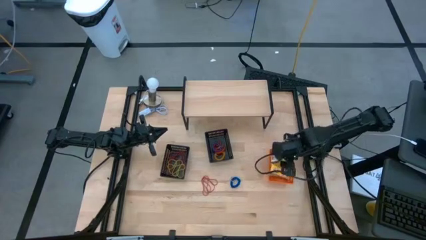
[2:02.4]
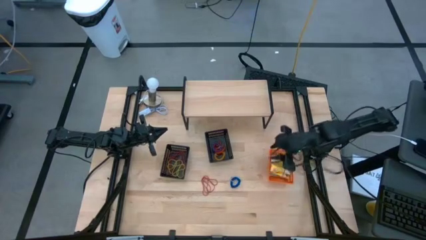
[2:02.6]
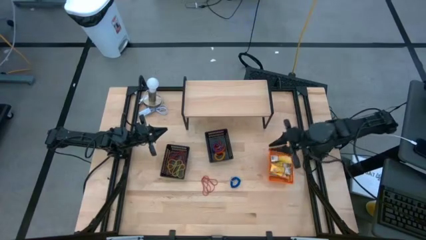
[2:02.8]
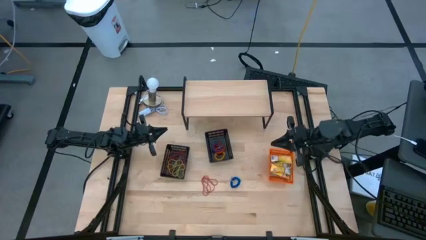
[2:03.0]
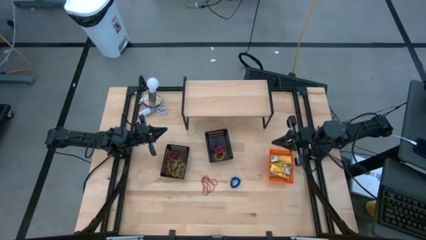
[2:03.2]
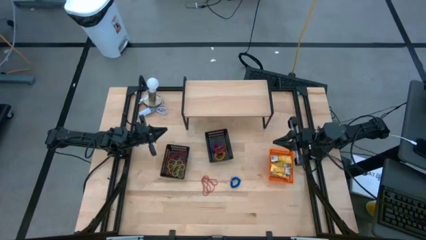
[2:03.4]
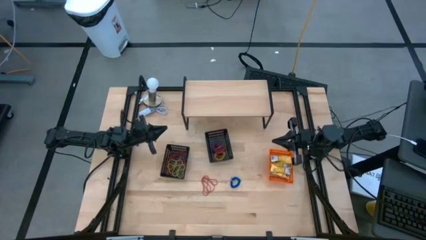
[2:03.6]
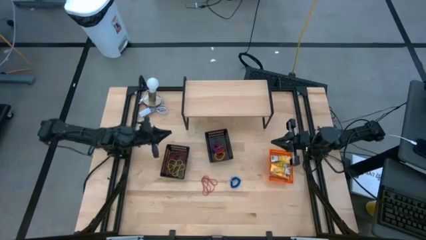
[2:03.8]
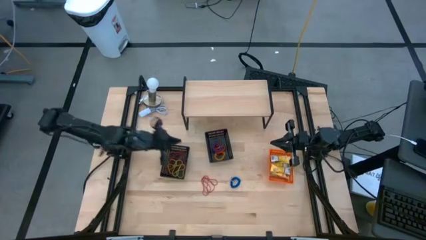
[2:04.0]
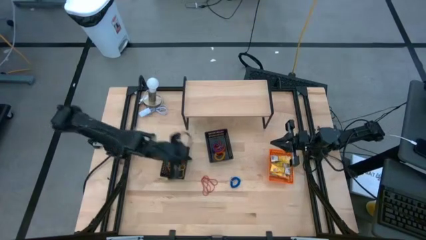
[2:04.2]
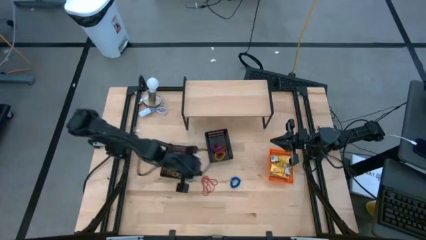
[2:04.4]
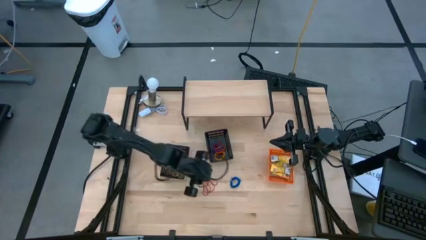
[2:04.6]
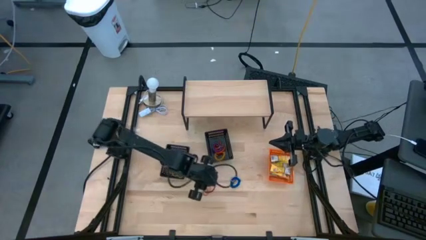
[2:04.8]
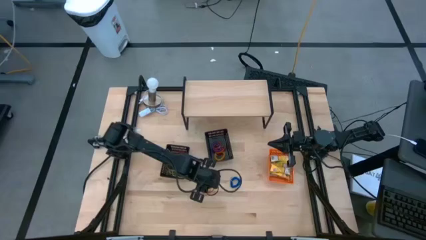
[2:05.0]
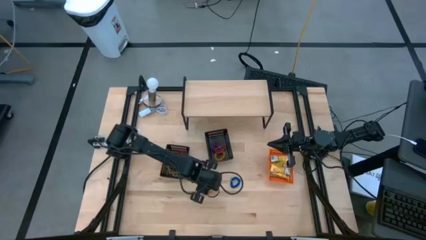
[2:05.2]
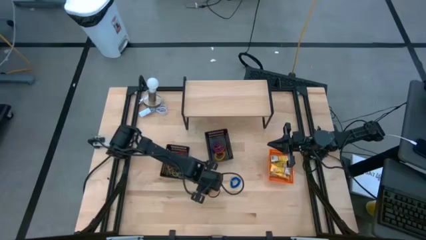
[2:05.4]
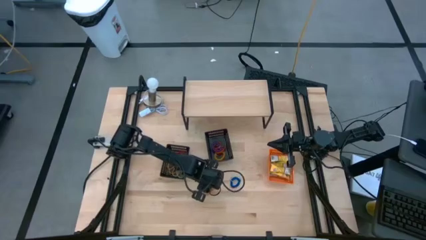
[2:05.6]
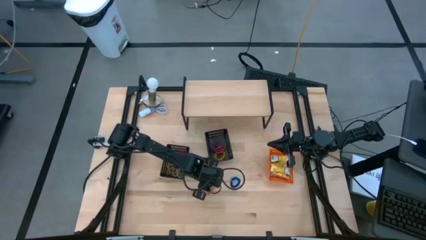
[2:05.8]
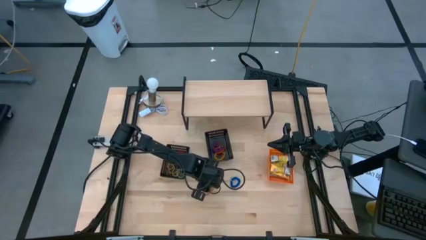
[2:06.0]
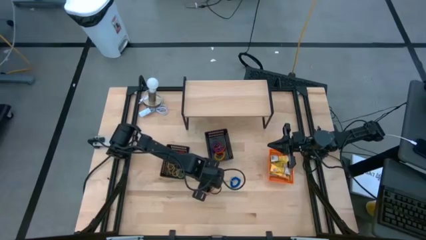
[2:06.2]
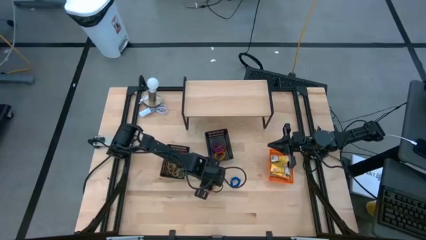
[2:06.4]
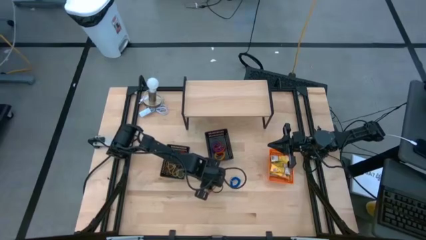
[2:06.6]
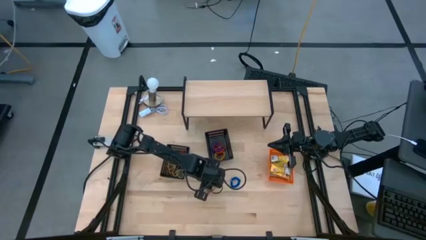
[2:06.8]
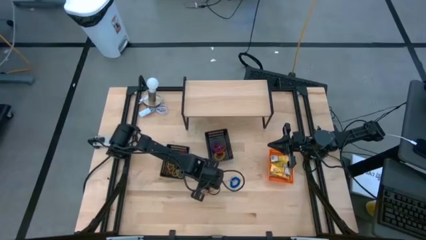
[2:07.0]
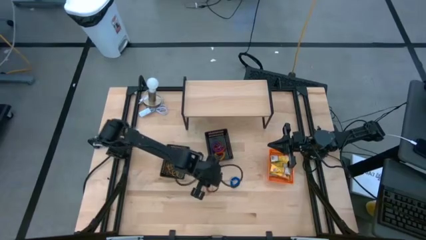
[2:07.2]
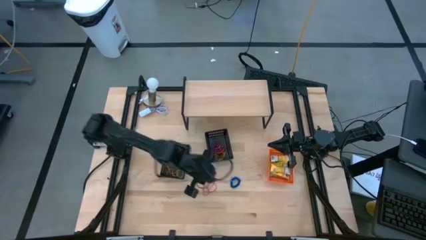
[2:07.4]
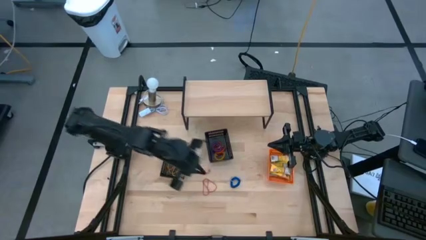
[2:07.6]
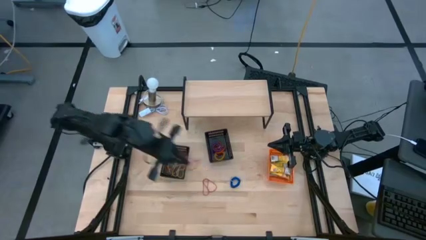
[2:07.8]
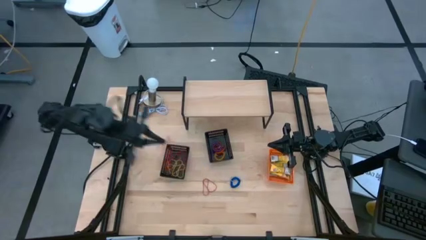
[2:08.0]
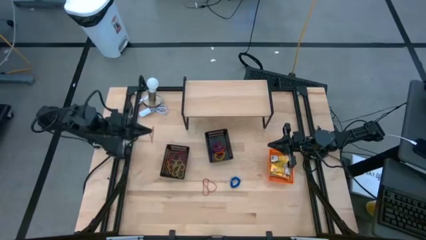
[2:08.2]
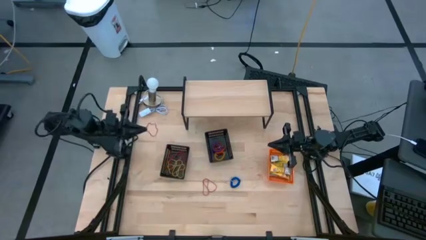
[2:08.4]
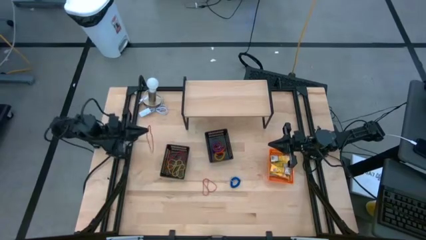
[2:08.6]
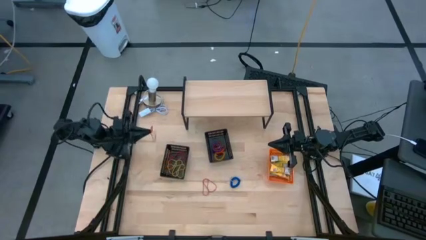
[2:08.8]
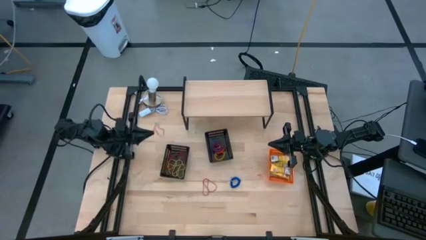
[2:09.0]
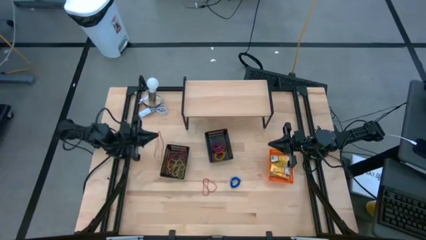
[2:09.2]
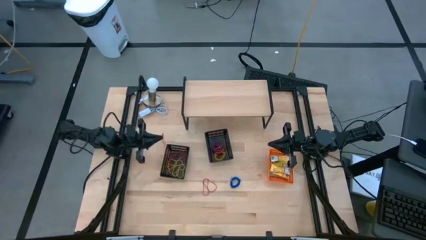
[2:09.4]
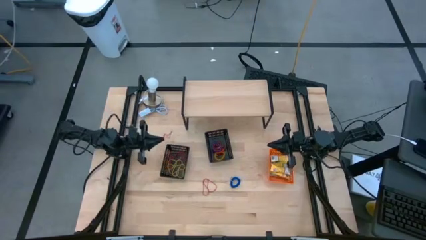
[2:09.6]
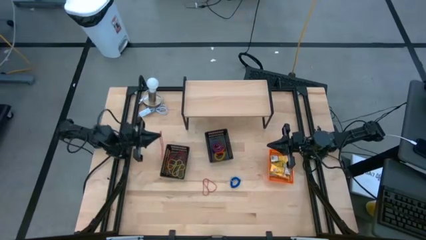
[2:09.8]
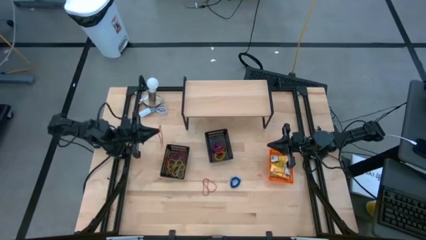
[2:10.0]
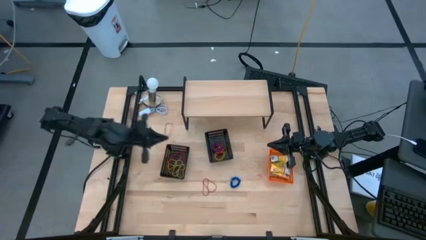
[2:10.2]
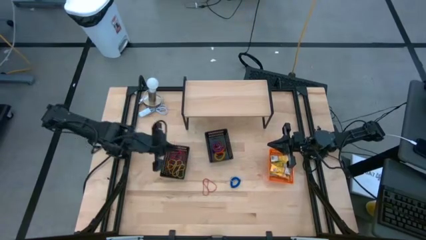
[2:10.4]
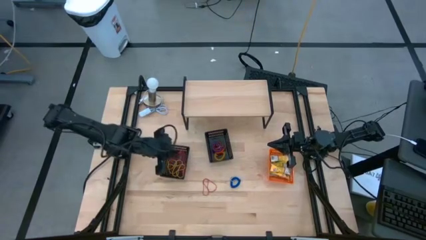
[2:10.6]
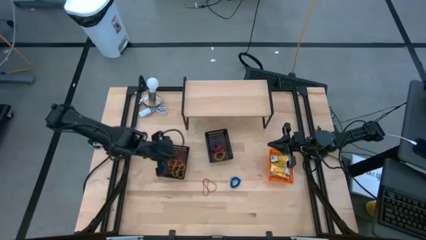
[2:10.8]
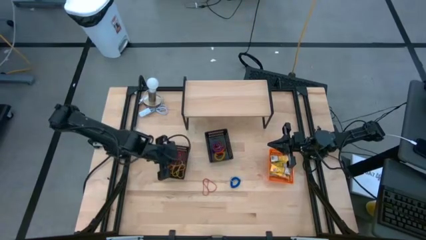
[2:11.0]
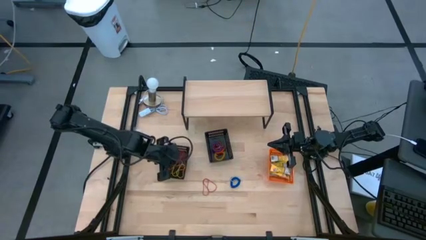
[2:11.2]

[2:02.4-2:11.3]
Task: Pick & Place Office Desk Supplies
Put the red rubber band into the left black bin

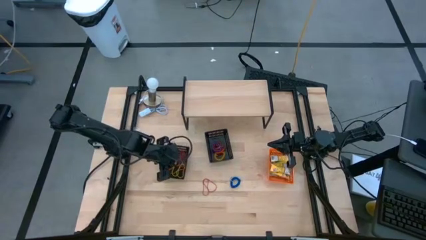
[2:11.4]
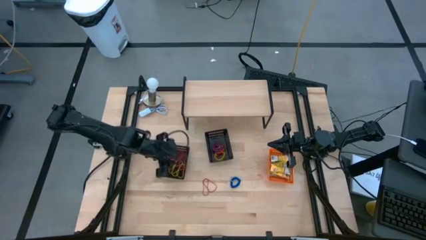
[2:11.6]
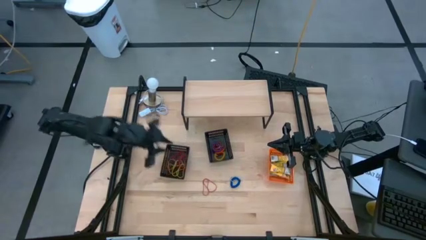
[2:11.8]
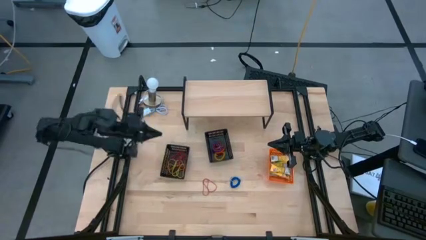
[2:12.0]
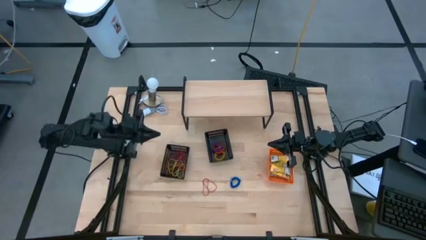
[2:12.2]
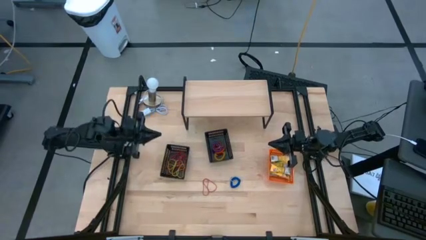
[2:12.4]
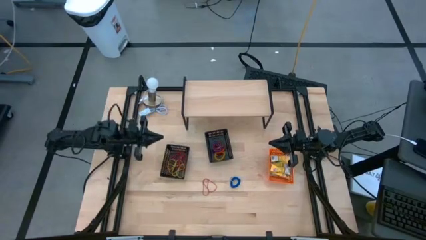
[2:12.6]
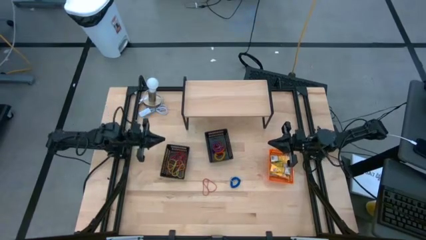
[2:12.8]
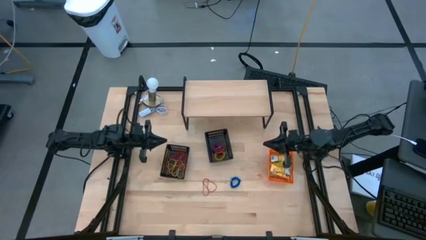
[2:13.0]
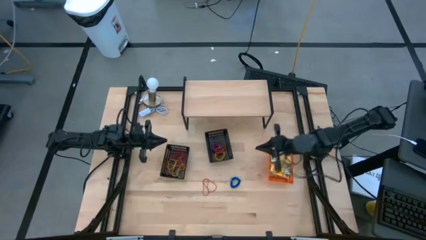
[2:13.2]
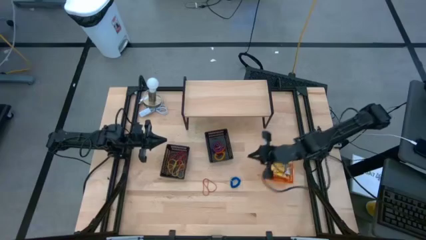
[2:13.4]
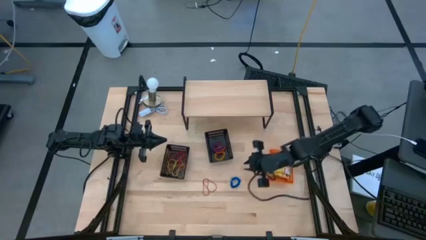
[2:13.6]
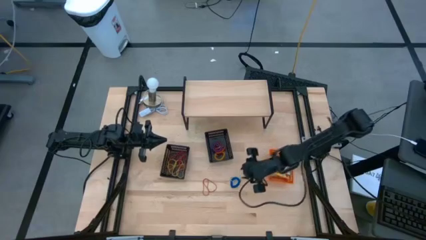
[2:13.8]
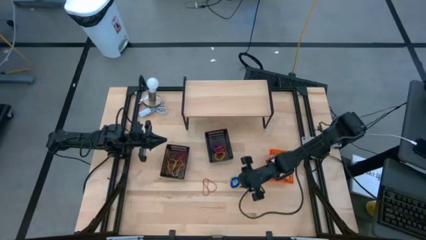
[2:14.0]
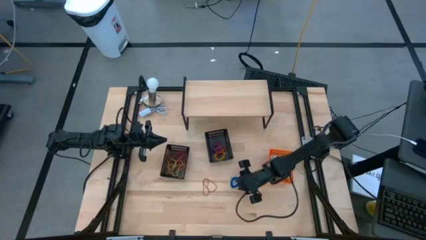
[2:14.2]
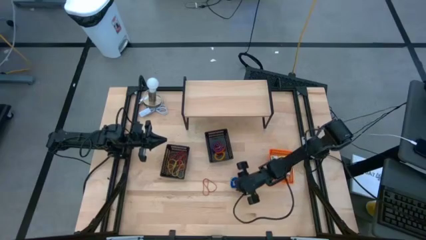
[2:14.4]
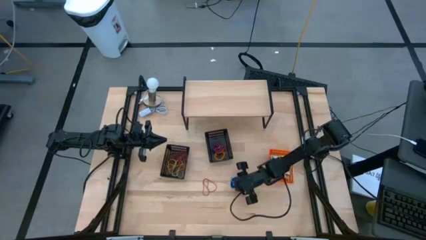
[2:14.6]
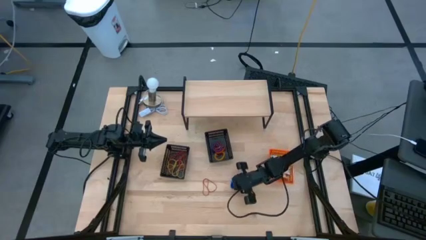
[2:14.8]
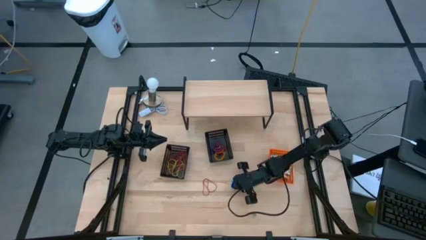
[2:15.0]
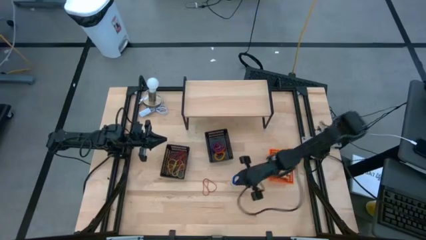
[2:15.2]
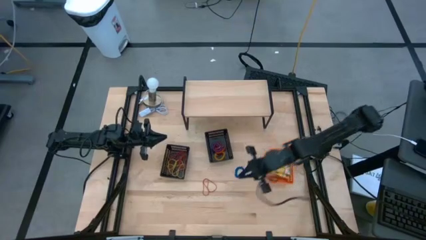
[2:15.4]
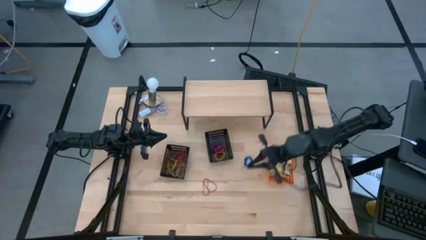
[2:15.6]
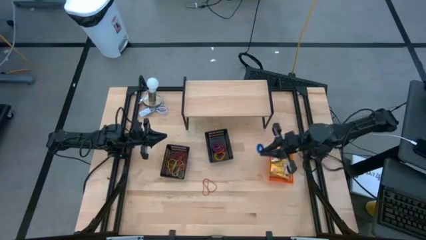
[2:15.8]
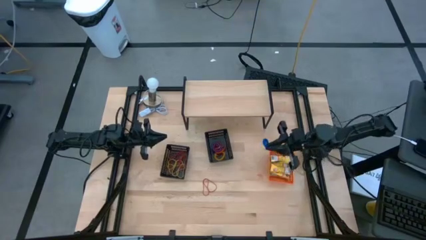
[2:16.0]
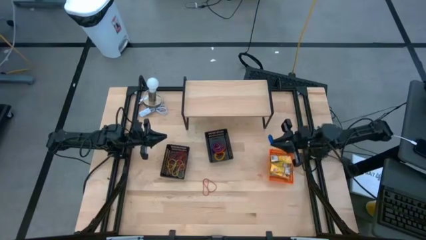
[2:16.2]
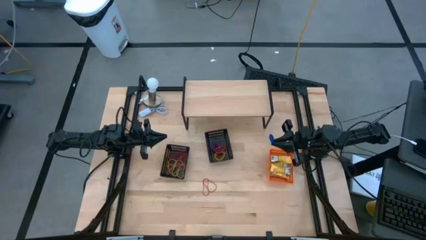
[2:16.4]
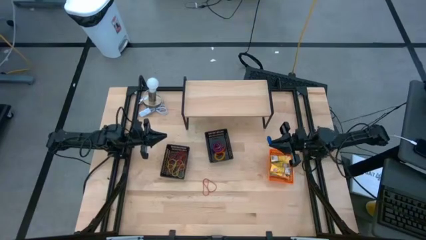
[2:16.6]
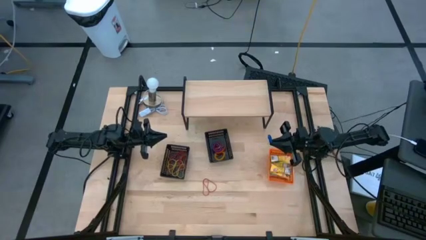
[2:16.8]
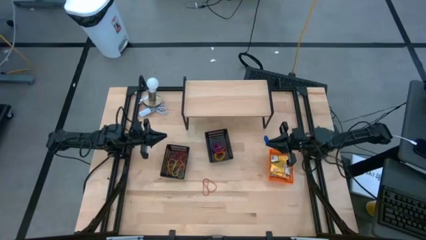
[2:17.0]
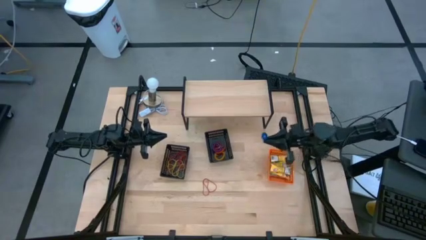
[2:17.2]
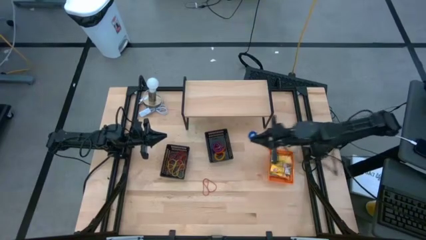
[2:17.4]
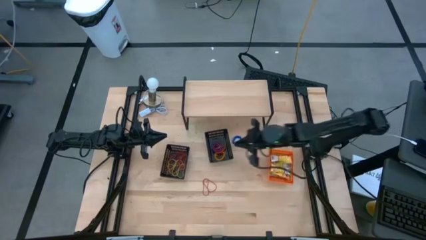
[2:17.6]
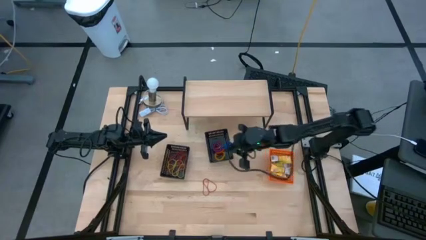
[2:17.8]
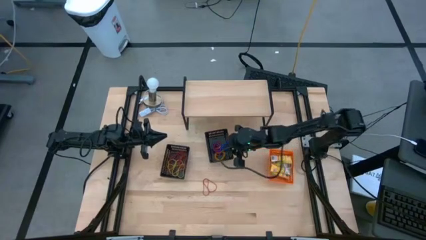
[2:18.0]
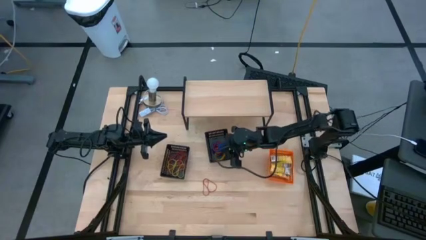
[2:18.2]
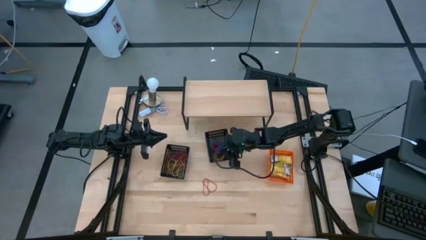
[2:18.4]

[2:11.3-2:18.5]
Put the blue spring keychain into the right black bin

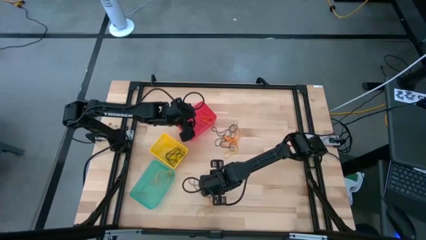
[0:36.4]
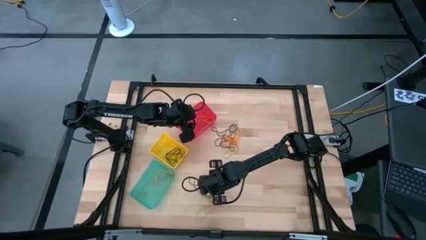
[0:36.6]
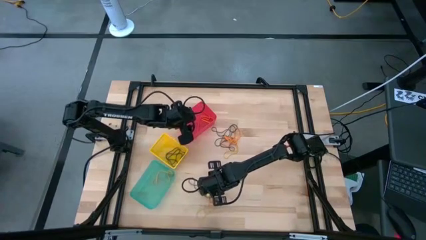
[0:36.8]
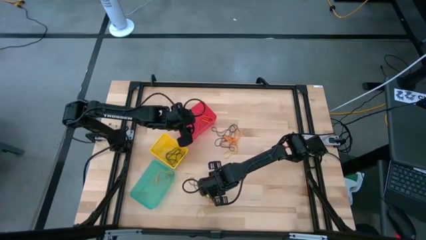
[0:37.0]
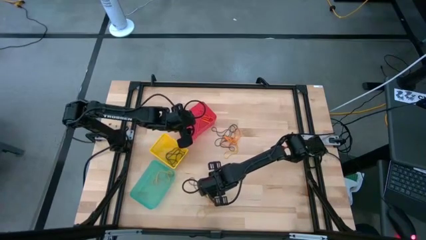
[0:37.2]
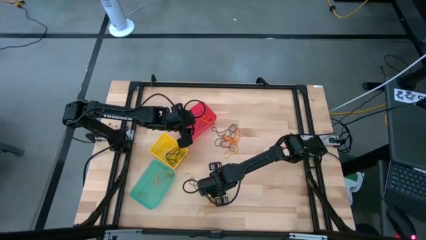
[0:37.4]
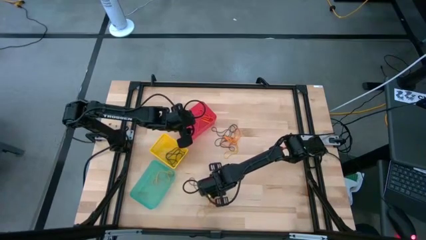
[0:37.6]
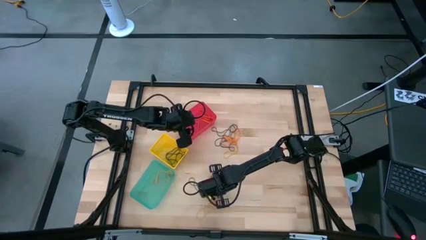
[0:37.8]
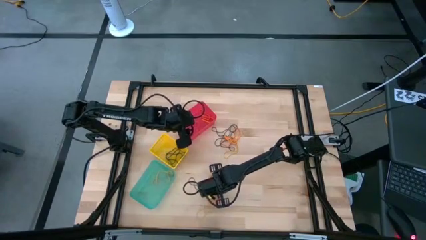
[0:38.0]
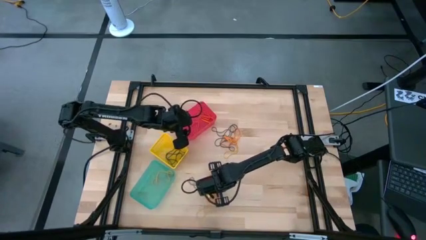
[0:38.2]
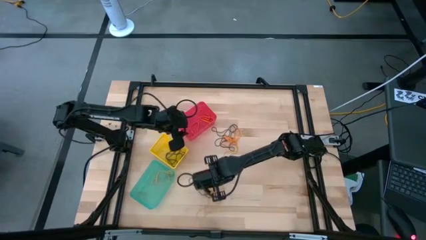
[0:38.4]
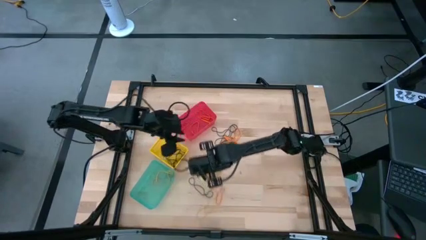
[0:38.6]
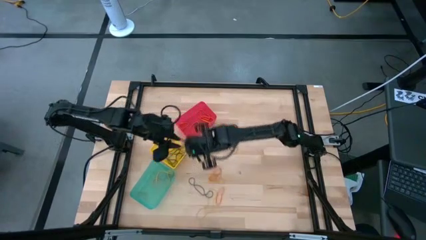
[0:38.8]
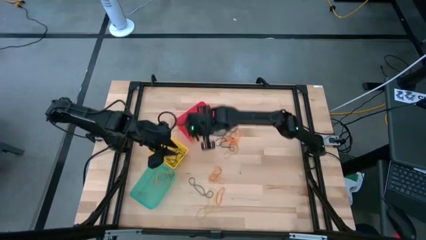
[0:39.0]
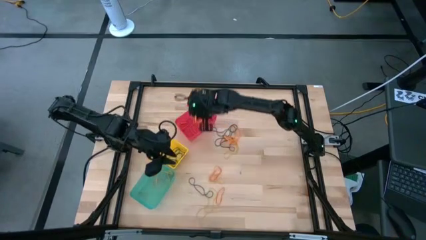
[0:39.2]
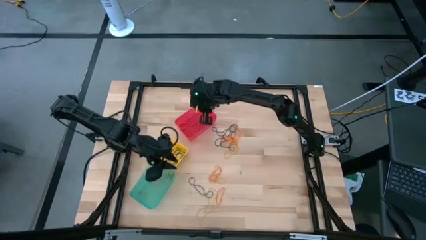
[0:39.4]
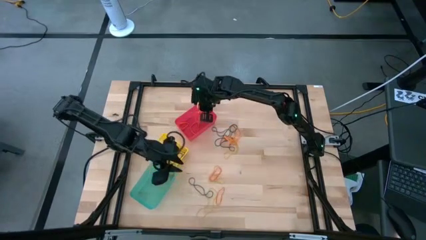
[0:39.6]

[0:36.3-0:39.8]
Task: Sort rubber bands into baskets
Put the orange rubber band into the red bin
